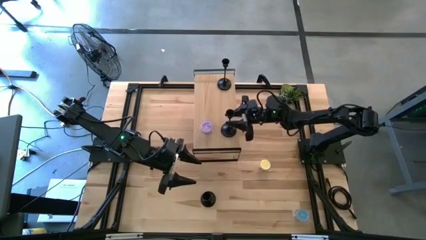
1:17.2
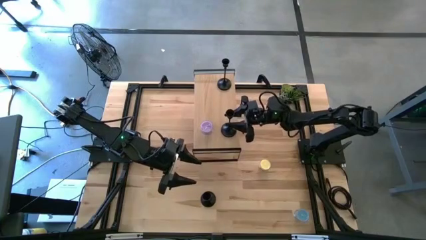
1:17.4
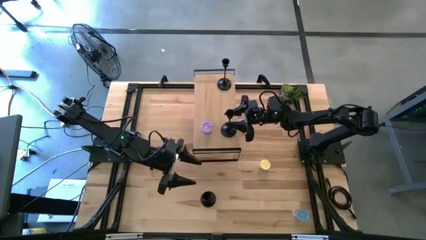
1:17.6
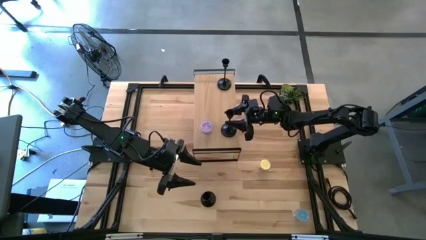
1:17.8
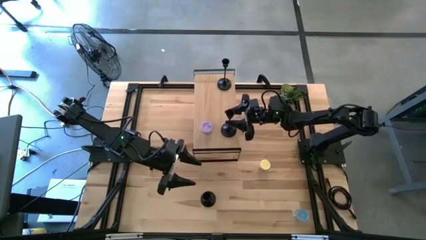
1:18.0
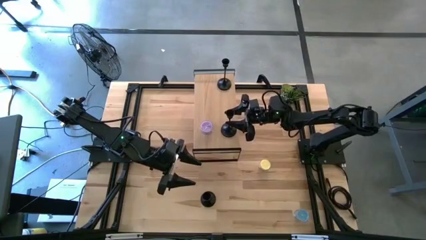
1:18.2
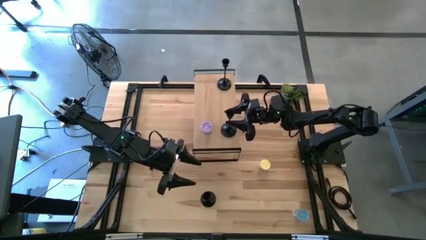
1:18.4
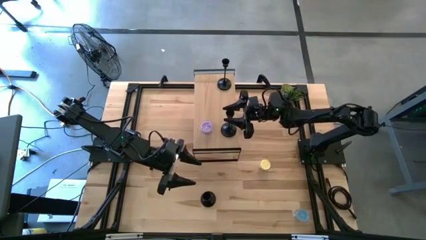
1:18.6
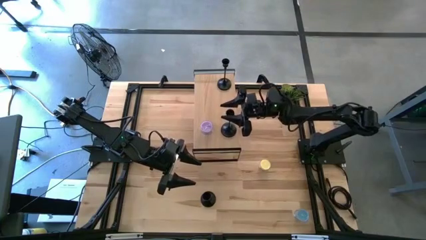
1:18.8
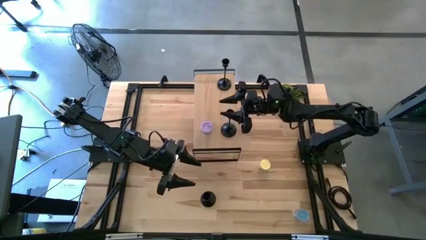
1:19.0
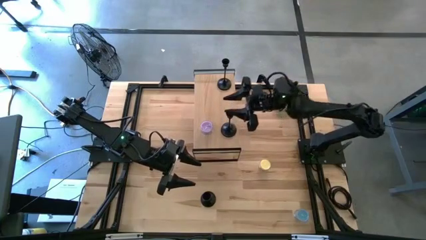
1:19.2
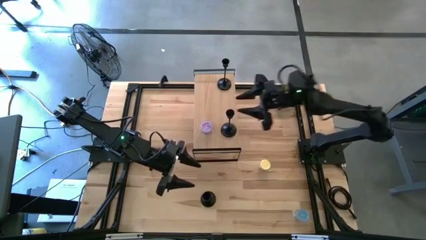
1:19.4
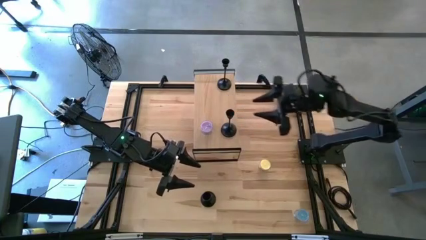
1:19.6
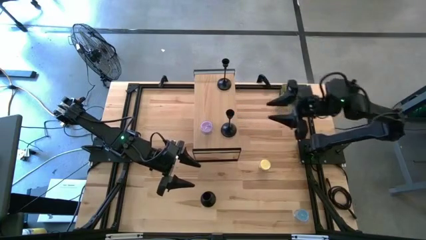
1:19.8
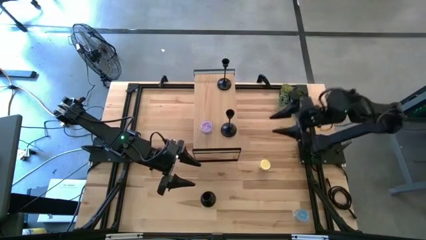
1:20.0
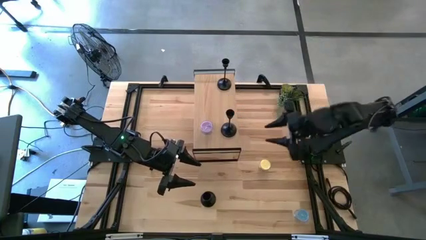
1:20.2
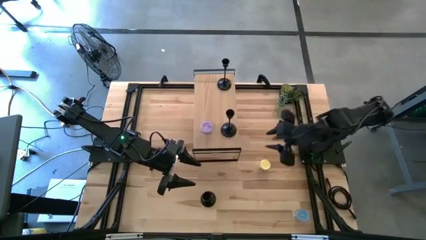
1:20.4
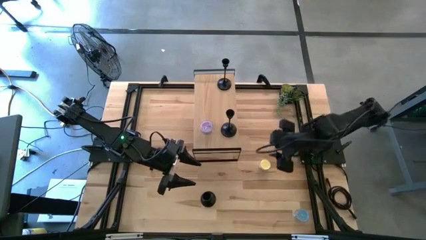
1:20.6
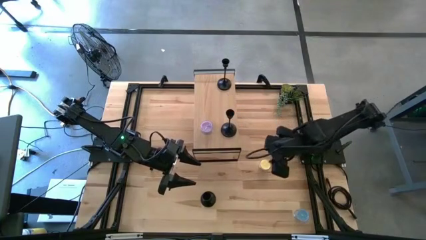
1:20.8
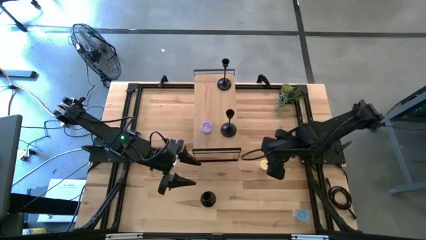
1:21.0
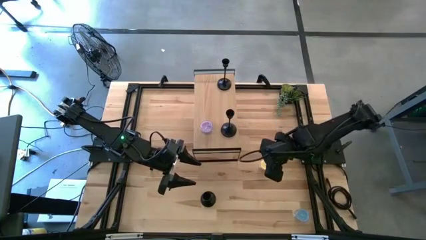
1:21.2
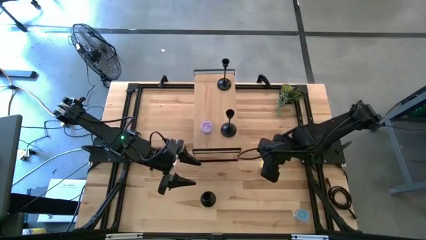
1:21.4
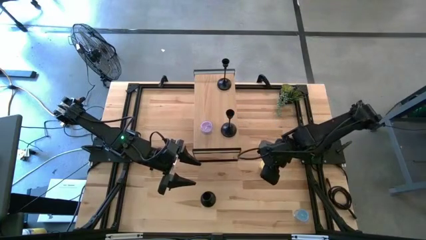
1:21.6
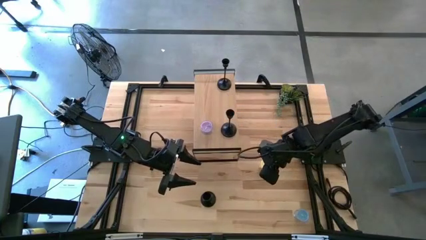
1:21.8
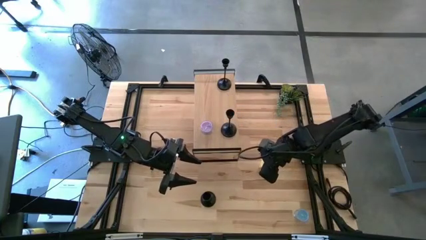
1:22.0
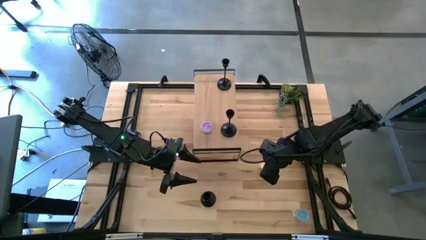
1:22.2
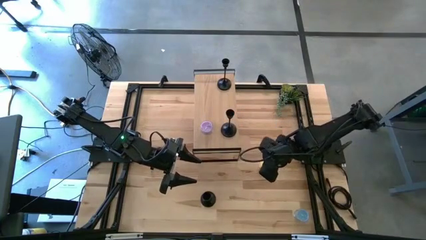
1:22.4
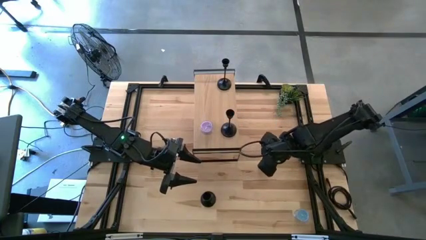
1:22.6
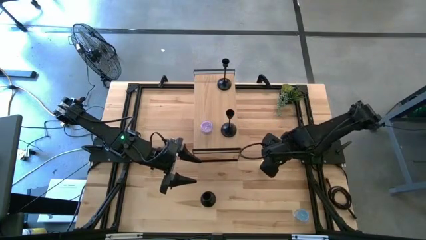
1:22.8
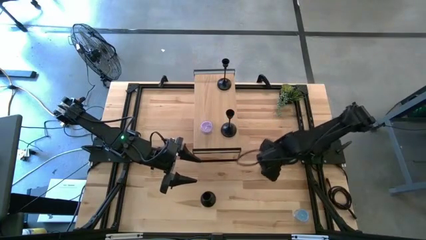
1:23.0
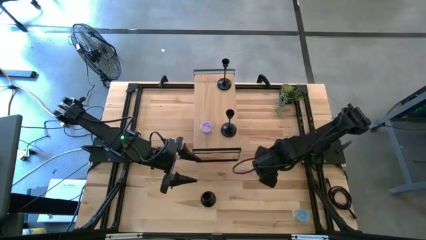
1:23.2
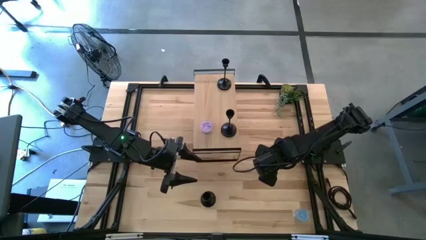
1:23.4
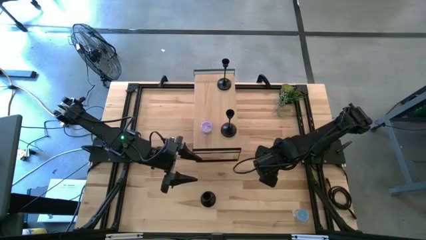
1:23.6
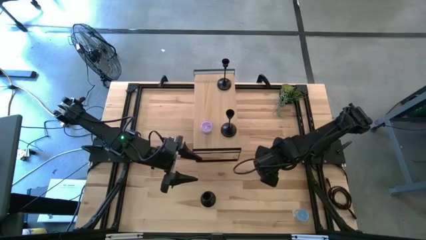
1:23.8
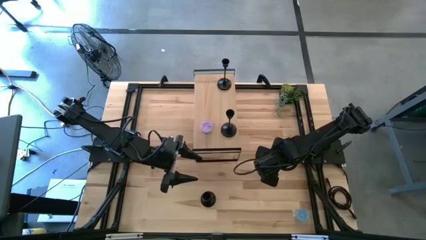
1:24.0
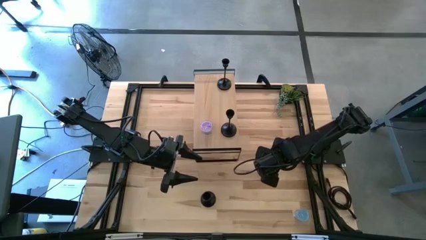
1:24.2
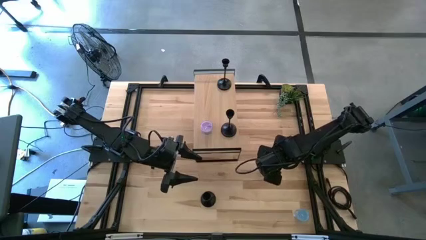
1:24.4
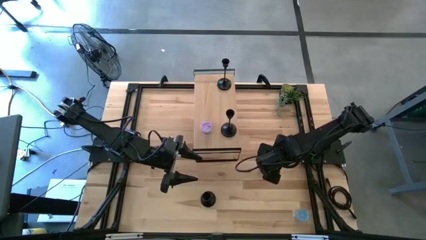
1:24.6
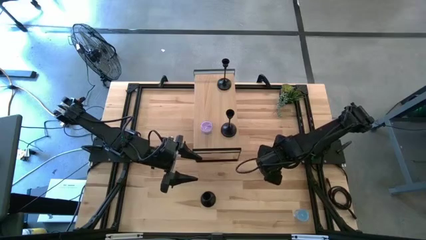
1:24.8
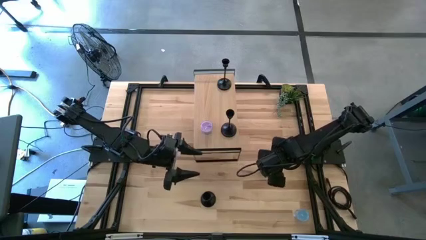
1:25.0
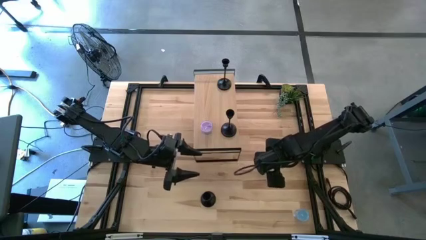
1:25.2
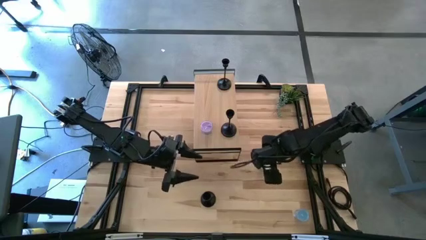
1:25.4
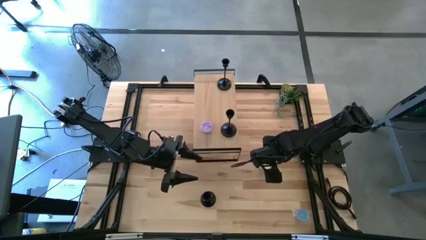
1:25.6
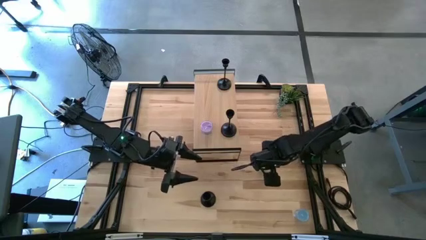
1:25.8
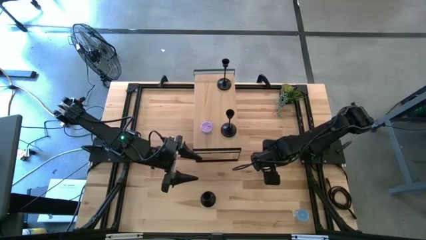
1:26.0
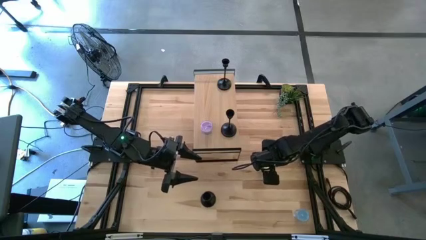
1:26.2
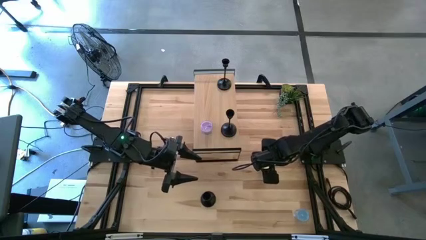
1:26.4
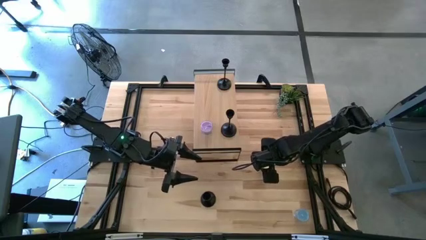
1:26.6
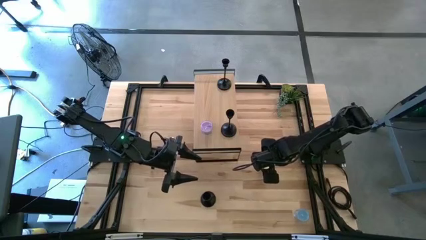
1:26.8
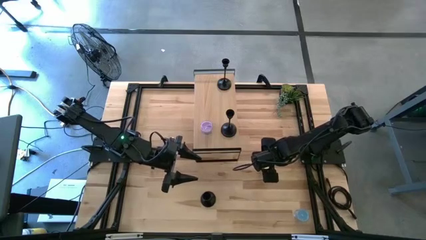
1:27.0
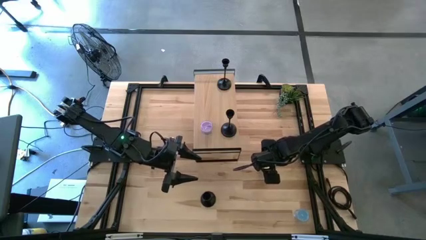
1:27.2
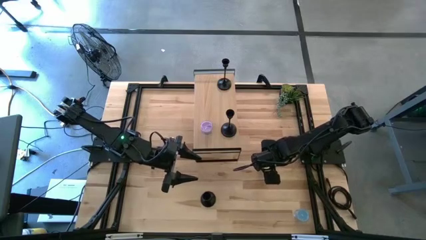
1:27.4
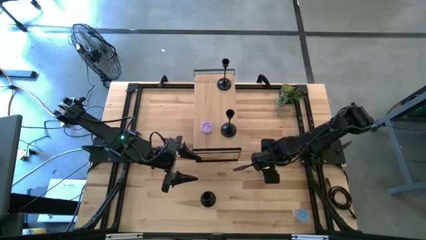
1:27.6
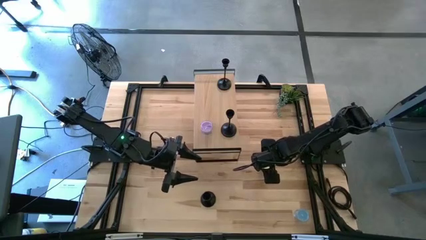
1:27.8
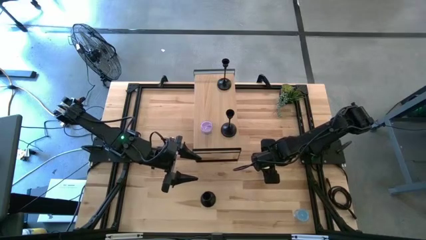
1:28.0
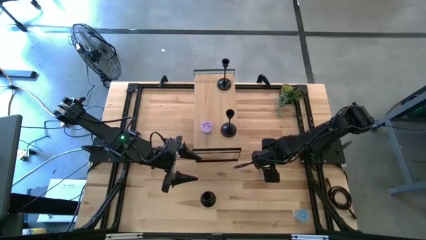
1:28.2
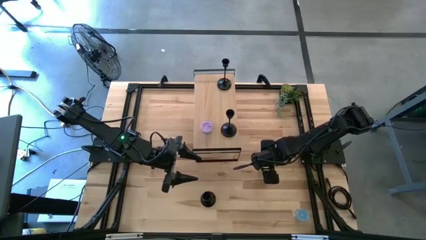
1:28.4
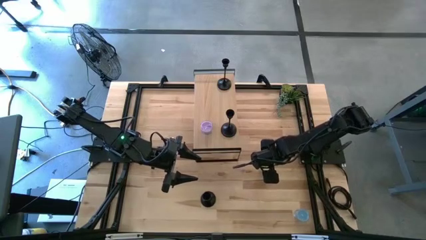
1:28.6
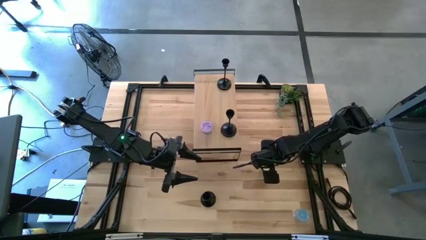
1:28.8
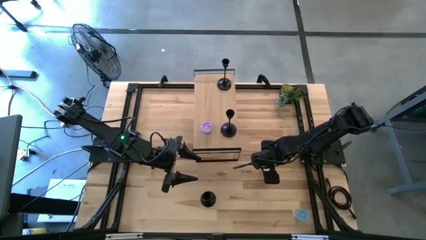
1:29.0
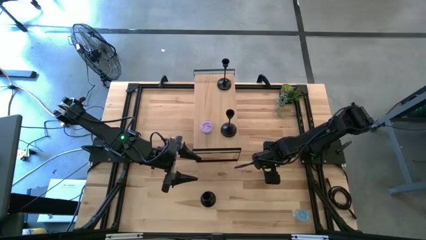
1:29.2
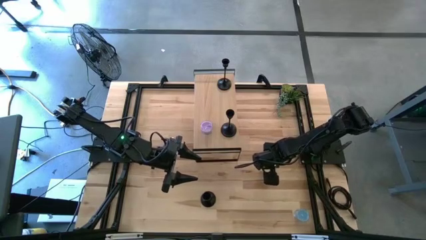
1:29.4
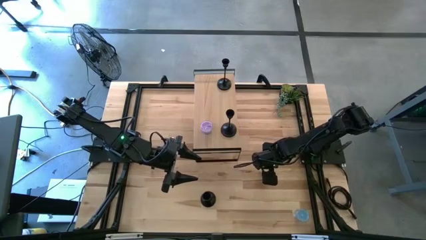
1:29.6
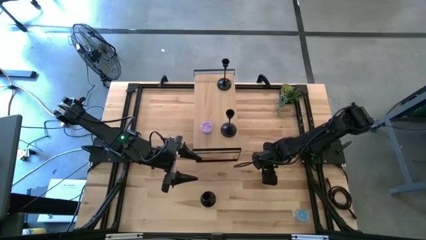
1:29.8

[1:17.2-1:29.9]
Task: Pick & Place candle stick holders
Put the yellow scented candle on the shelf

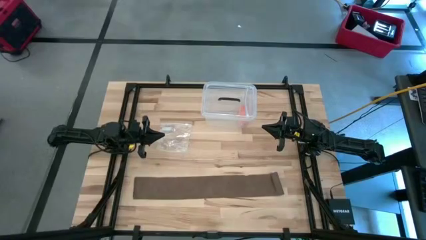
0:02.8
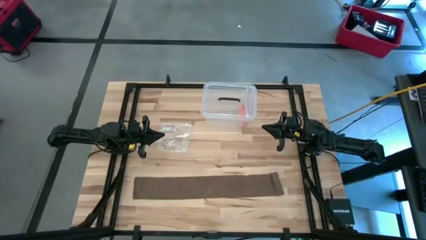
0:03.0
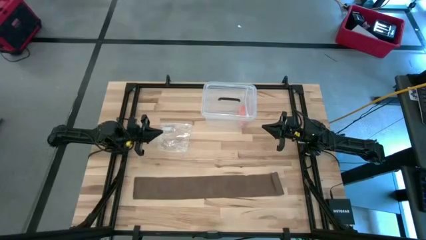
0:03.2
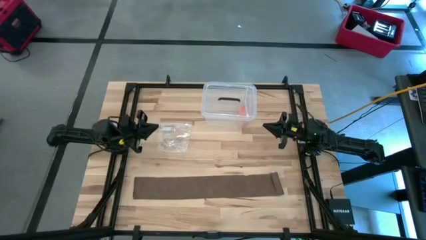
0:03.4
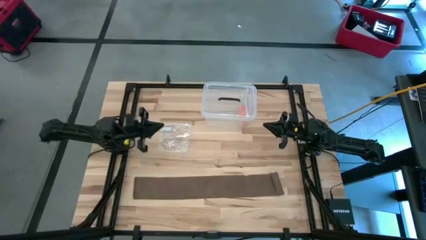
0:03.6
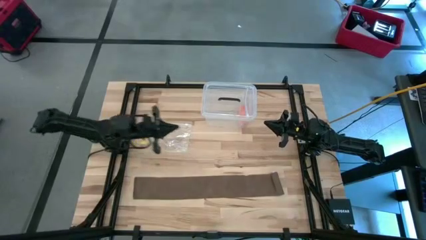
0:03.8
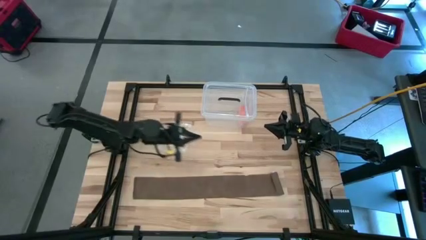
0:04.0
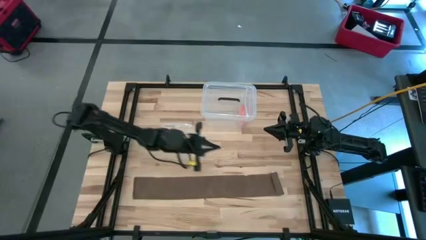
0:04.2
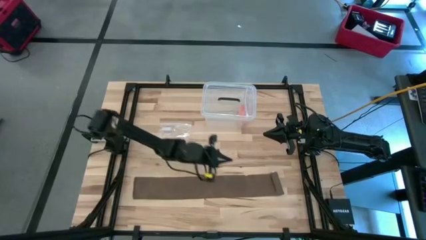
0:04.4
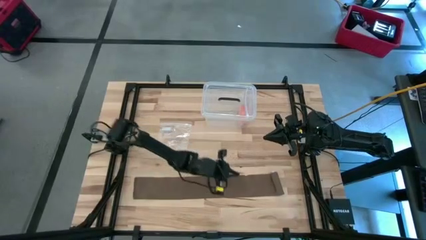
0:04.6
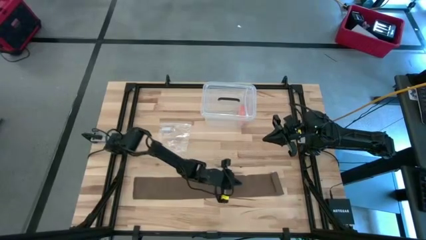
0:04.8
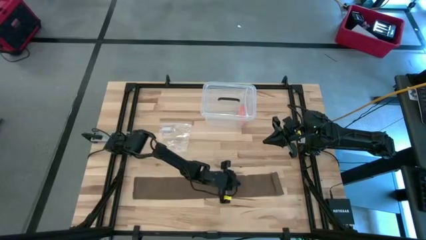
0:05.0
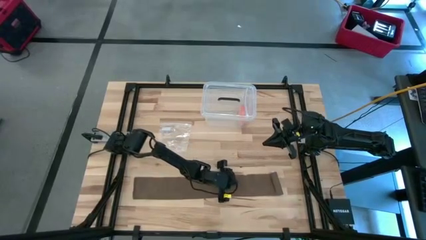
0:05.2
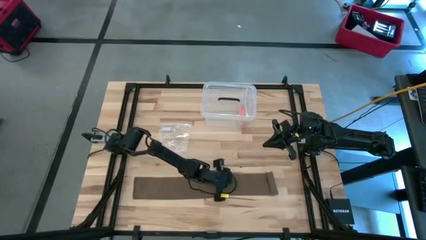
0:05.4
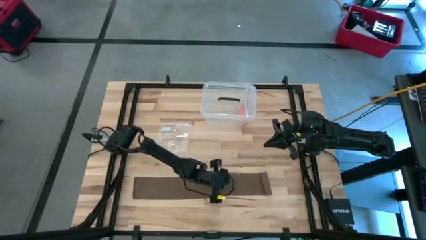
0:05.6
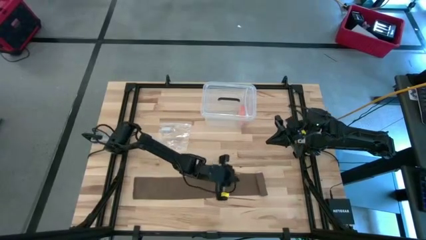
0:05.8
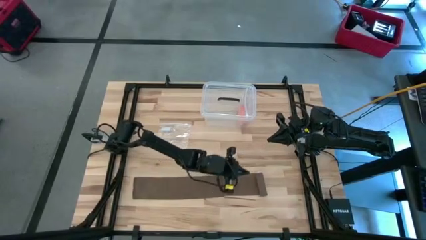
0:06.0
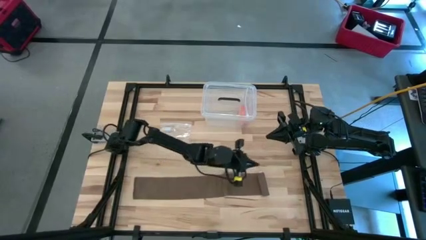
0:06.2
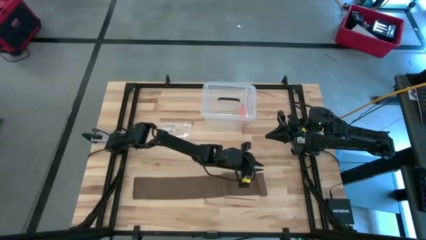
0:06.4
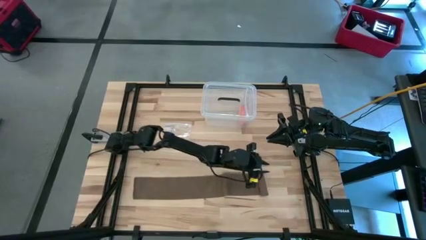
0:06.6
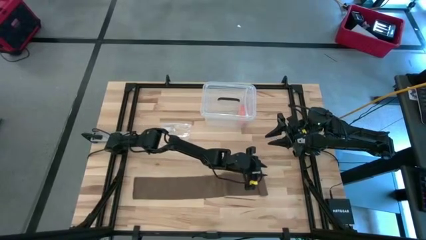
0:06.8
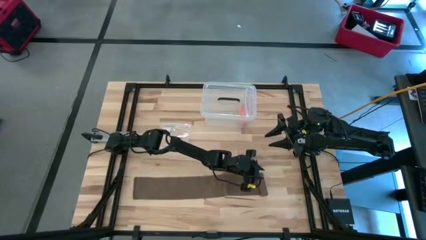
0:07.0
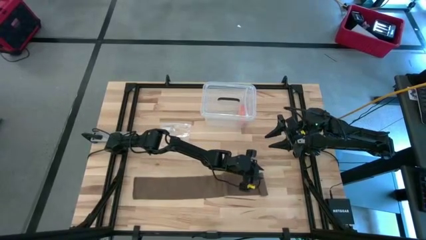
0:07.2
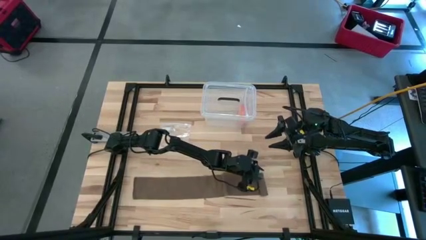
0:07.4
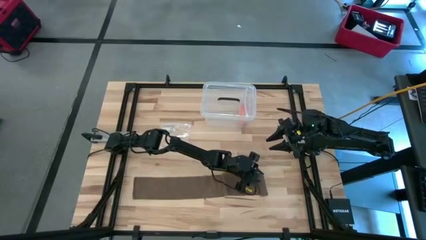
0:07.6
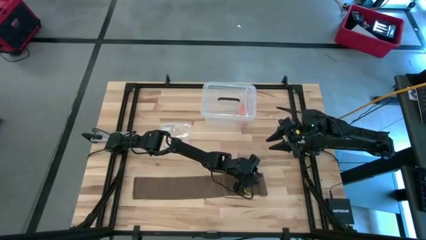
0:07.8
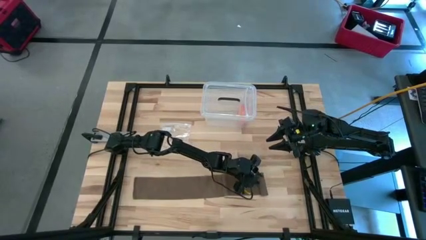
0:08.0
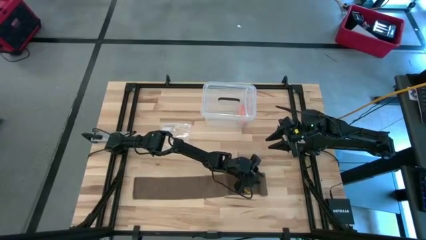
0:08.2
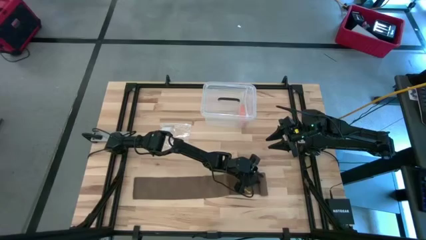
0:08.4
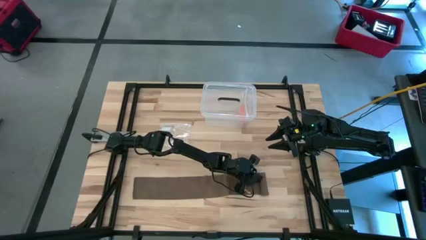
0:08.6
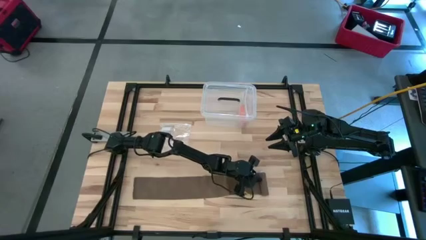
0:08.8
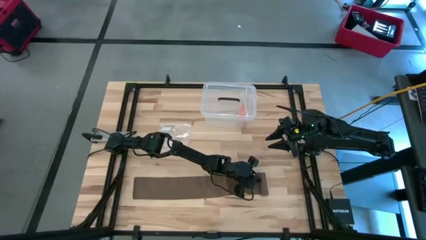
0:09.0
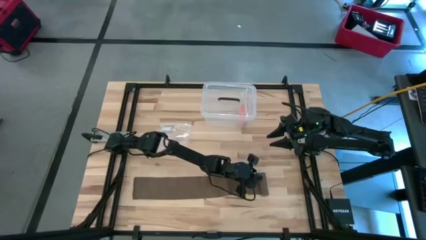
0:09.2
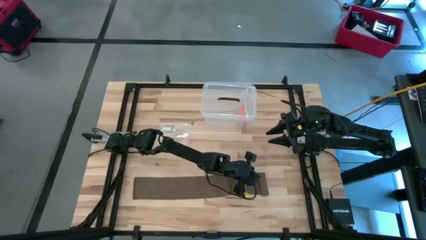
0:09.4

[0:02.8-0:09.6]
Task: Roll bandage
Roll the brown bandage
